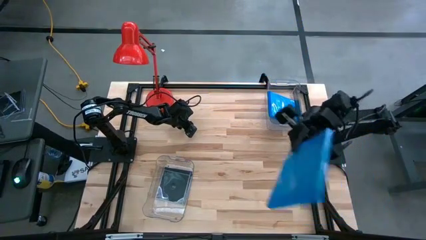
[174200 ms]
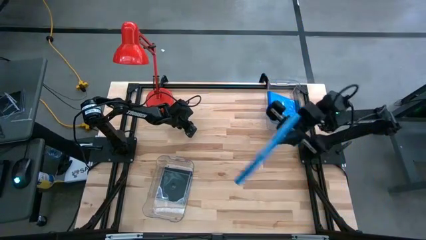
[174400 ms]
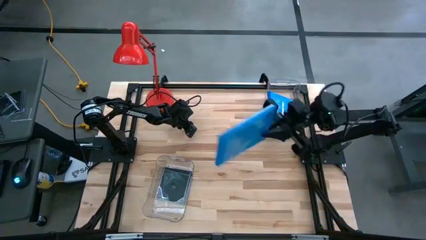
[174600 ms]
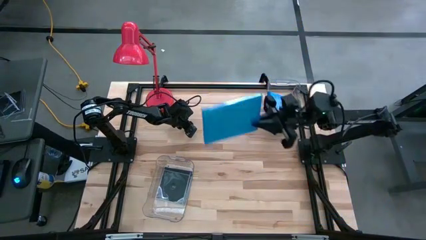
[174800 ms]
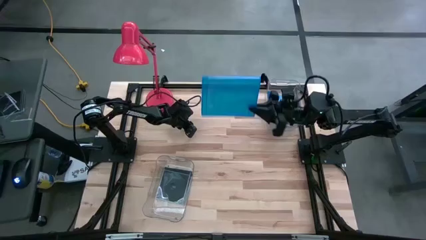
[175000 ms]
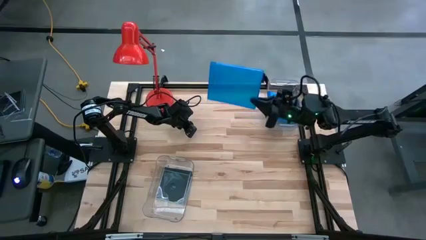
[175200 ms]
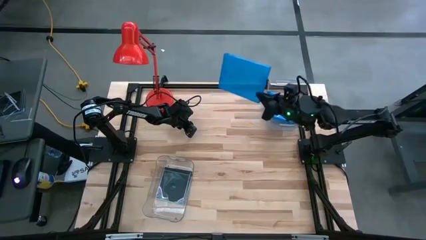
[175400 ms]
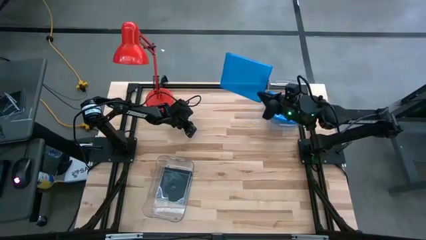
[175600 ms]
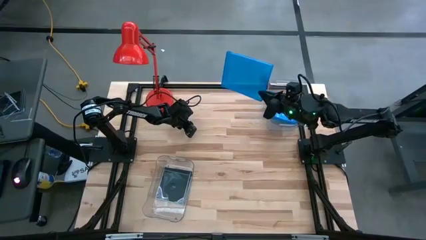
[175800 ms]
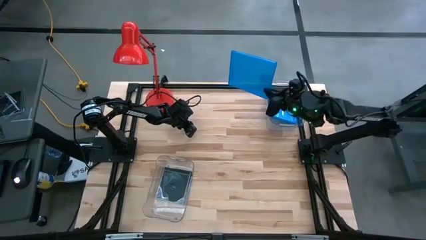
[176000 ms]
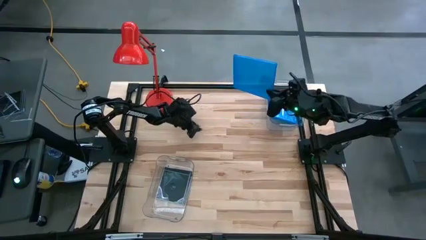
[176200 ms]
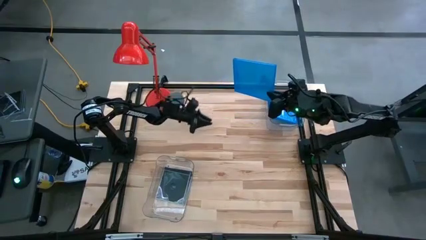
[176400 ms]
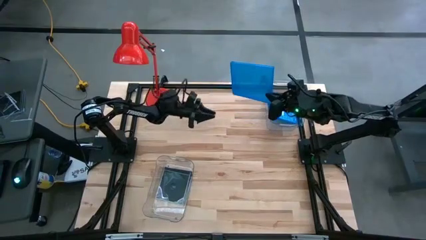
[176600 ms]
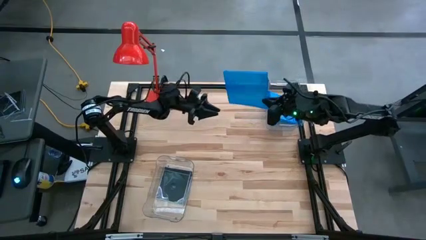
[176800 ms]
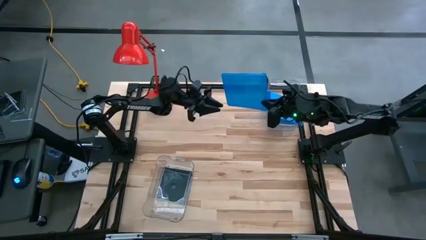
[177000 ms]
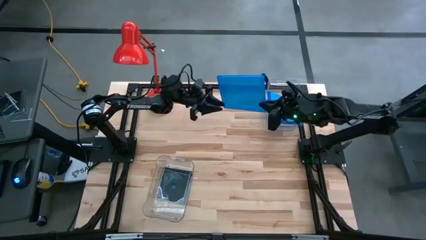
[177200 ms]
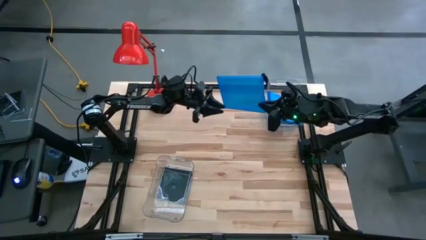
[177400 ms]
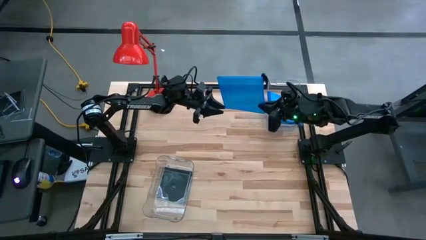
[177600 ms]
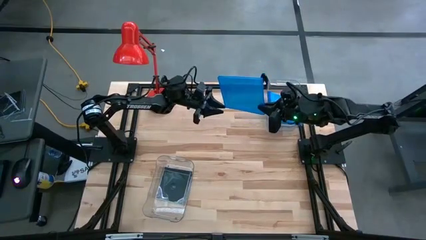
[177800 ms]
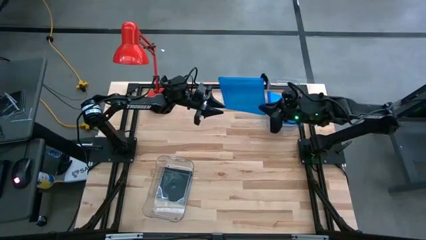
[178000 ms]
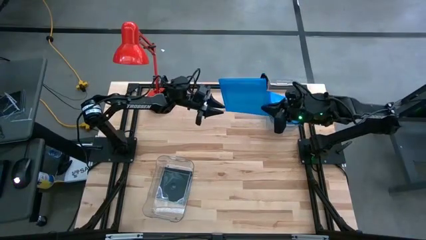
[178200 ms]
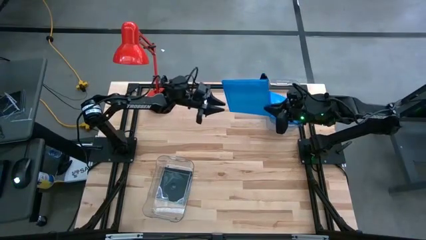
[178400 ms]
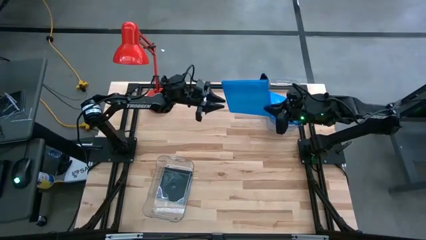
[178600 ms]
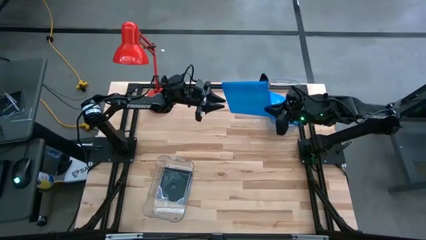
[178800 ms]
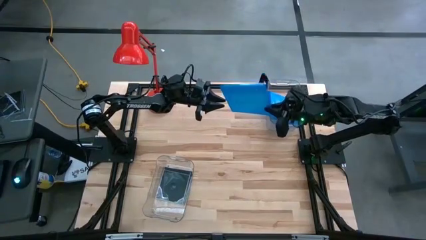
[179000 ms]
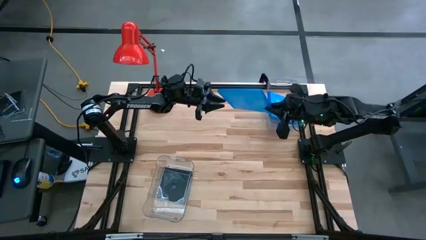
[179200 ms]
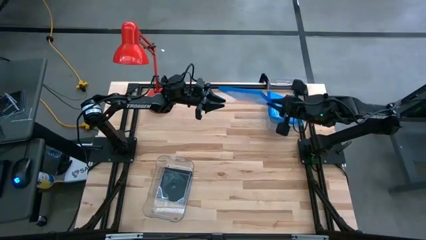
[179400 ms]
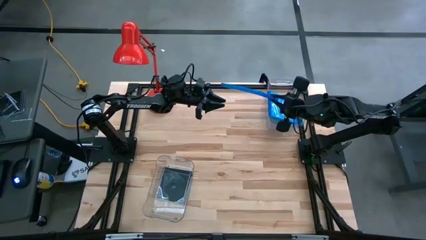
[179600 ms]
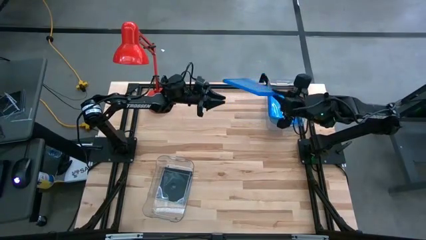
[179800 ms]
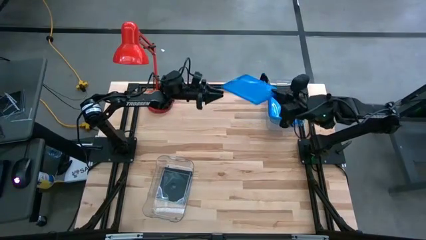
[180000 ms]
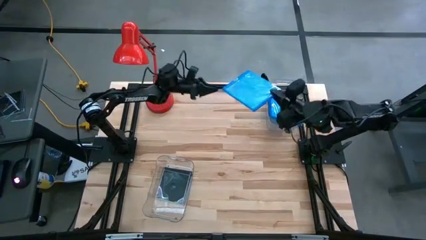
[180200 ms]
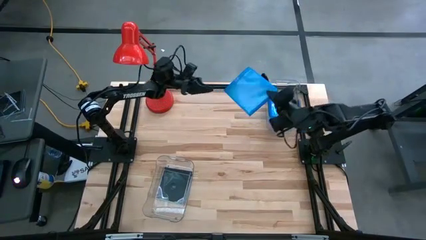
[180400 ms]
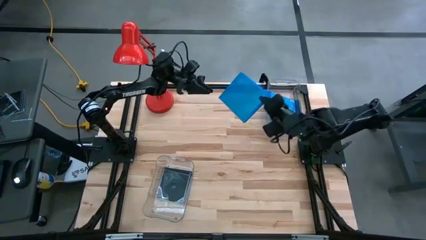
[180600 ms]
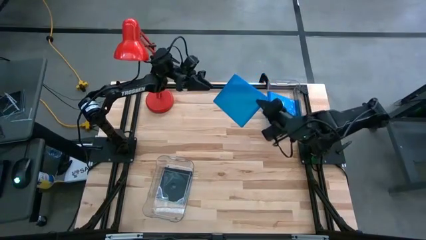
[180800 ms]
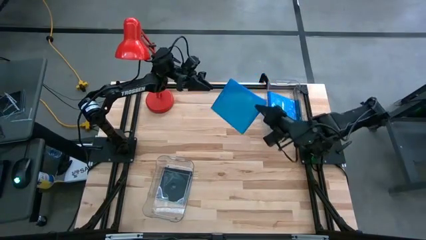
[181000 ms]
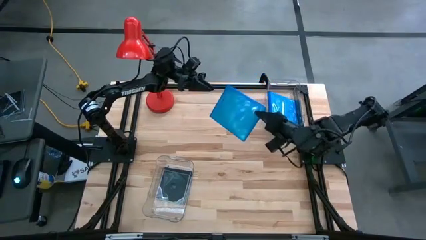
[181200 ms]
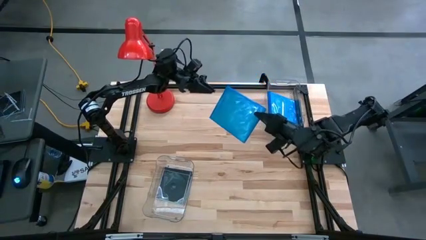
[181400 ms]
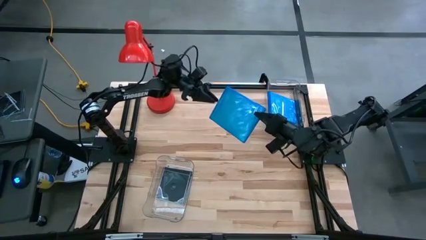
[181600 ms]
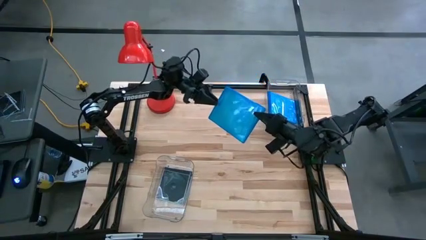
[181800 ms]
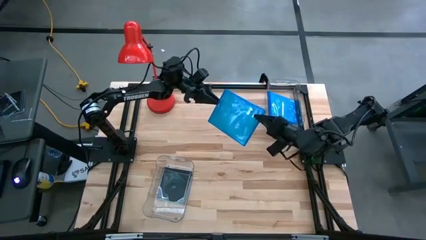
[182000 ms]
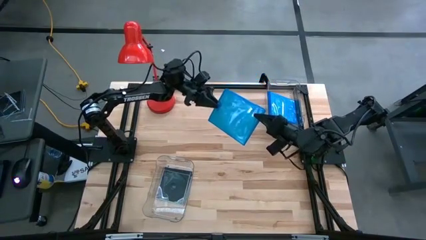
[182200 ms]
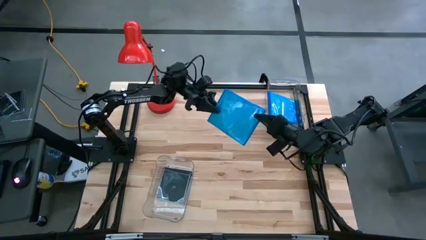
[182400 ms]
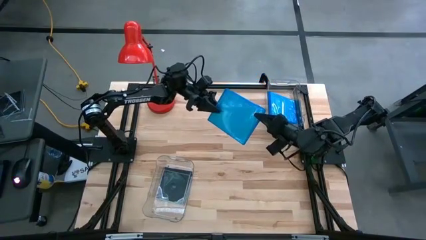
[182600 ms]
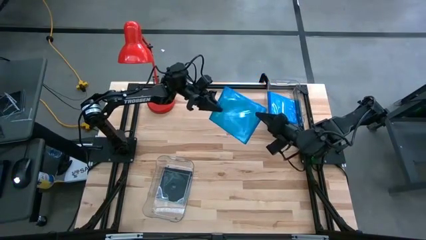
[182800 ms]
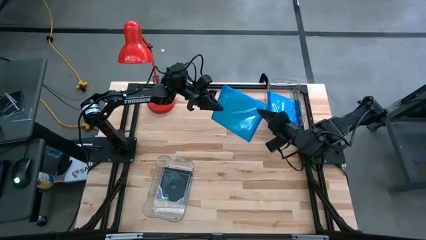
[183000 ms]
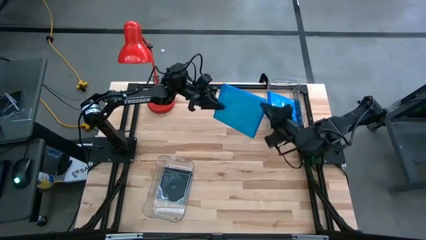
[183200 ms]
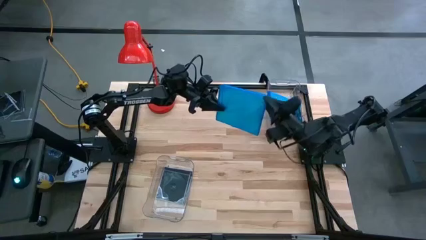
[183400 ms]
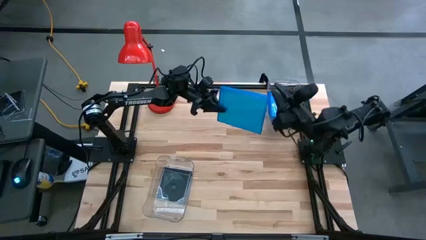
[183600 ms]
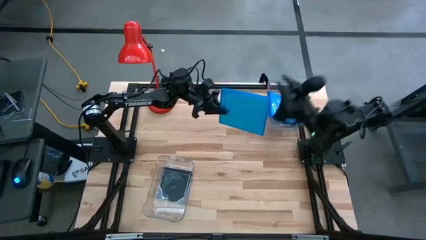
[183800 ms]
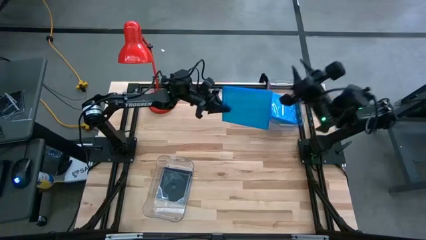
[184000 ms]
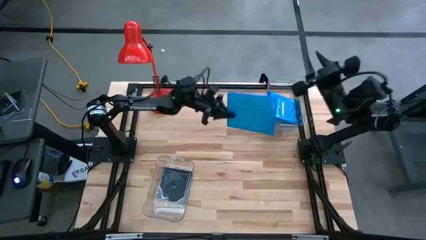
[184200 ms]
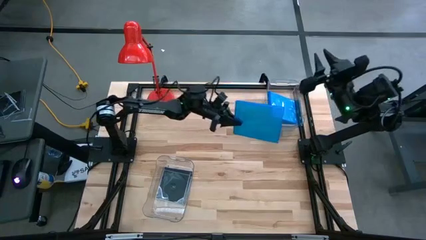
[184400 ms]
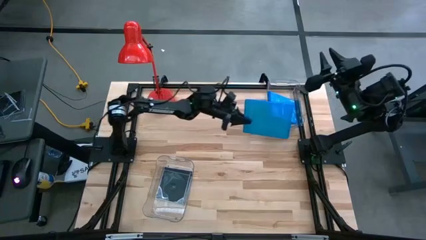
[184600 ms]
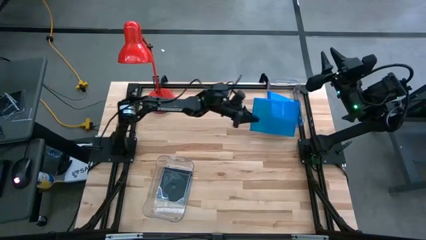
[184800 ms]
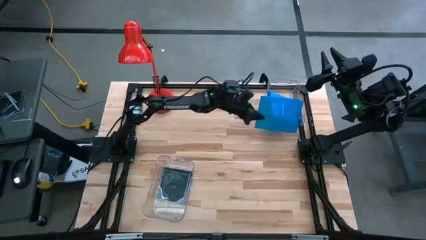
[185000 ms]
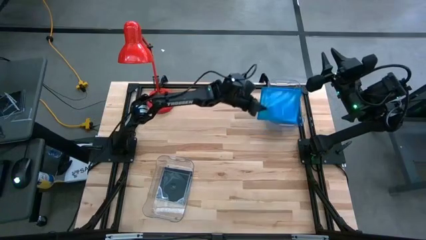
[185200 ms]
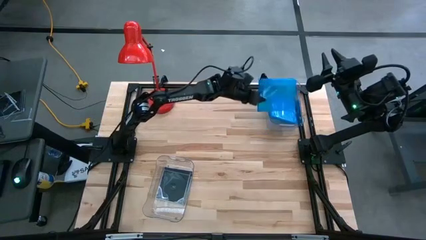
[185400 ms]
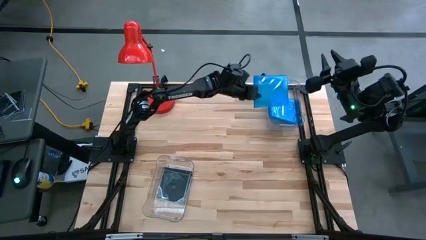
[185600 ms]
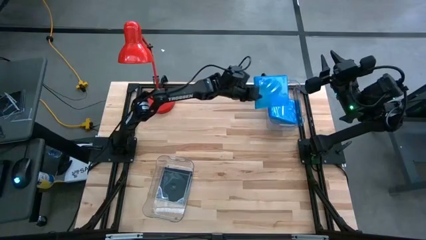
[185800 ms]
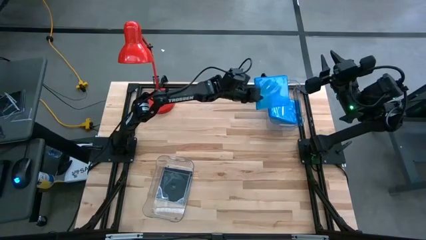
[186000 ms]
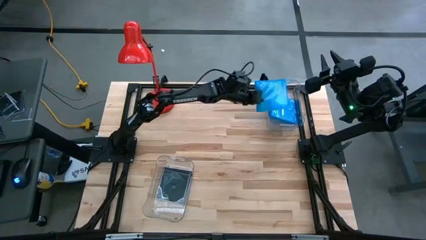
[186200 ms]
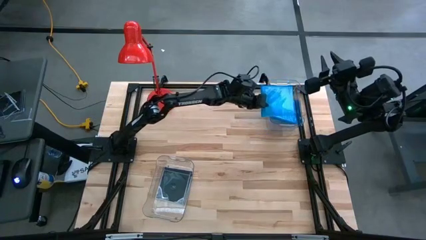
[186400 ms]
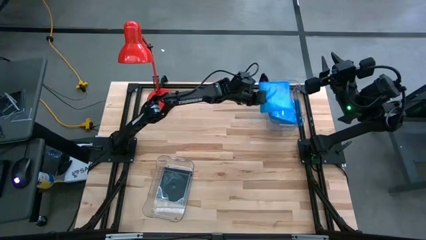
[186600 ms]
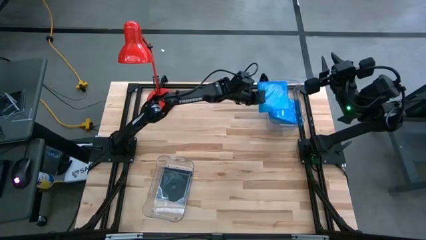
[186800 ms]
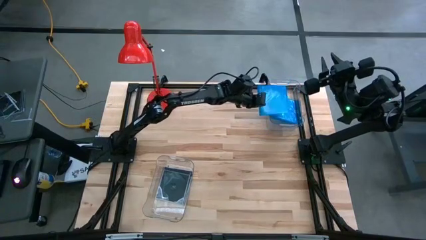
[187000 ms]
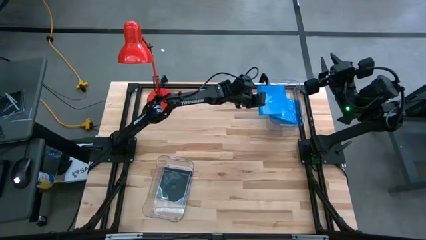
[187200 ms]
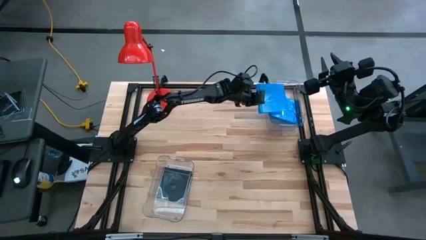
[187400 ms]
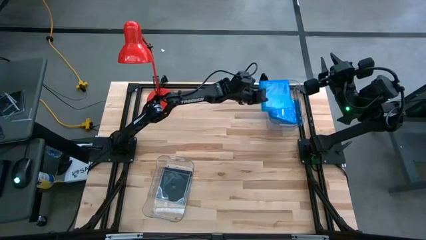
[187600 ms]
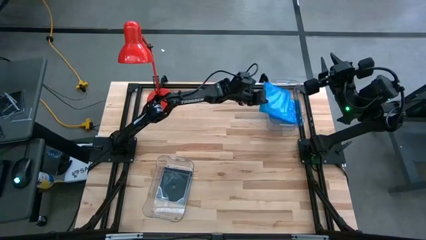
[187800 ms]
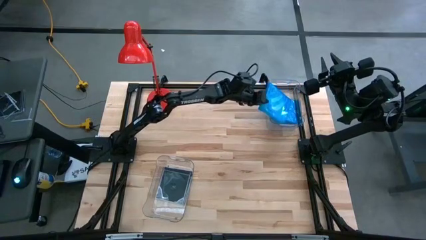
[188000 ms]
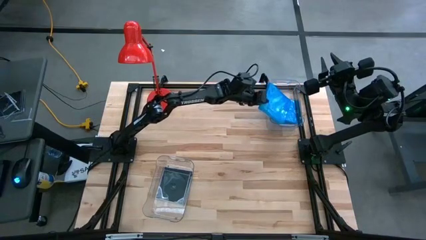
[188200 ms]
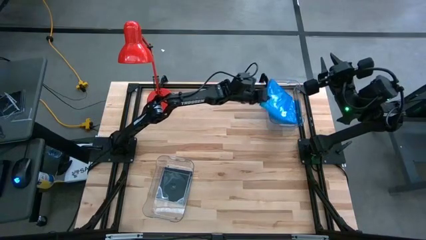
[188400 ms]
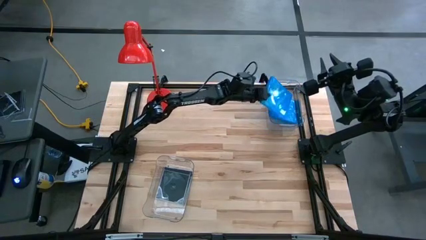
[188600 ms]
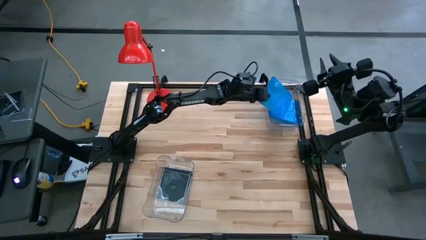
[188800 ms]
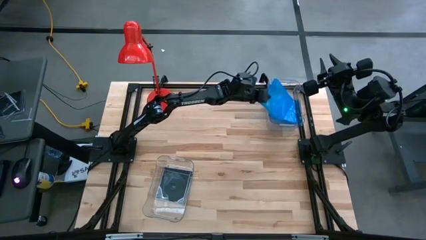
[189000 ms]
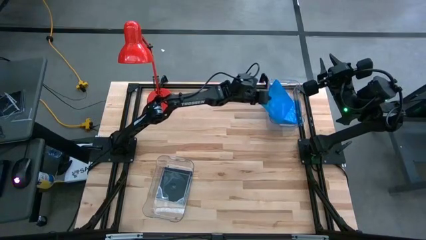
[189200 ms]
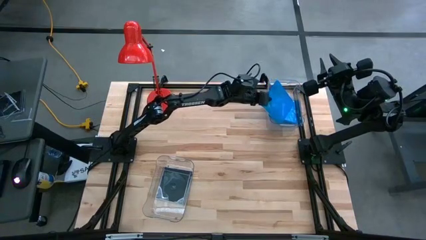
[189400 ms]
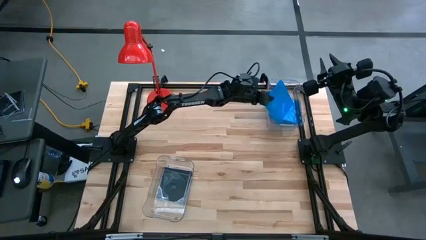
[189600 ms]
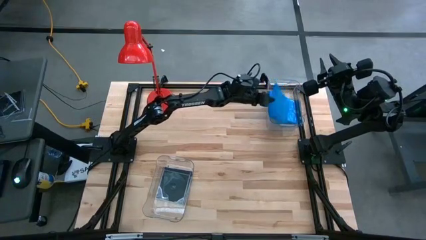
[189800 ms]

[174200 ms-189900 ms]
Task: Pick & place jewel cases by type
Put the blue cd case into the top transparent bin
